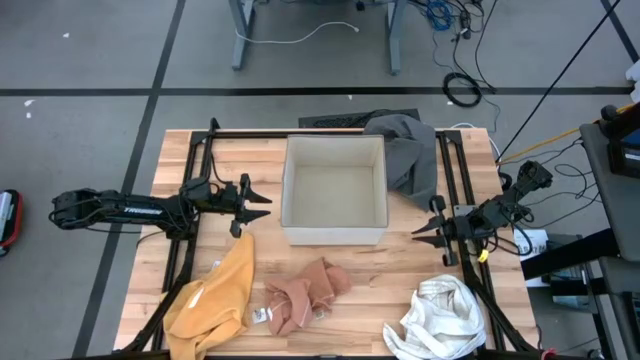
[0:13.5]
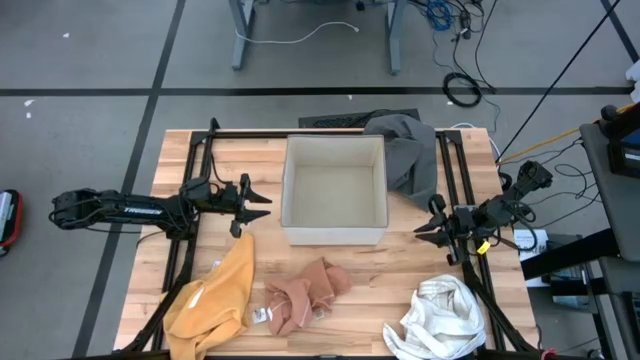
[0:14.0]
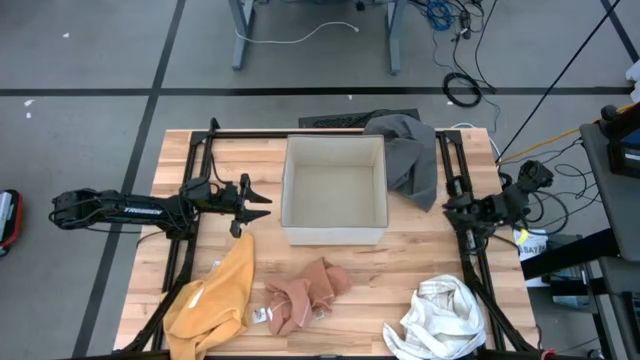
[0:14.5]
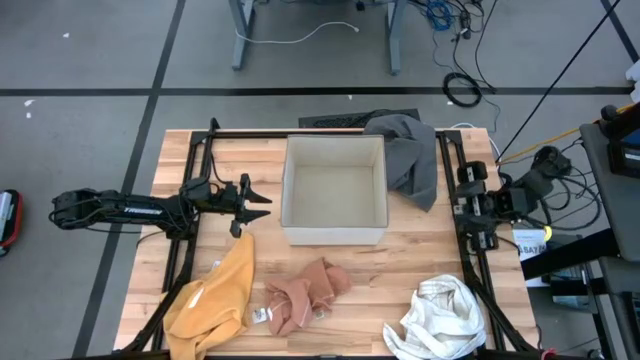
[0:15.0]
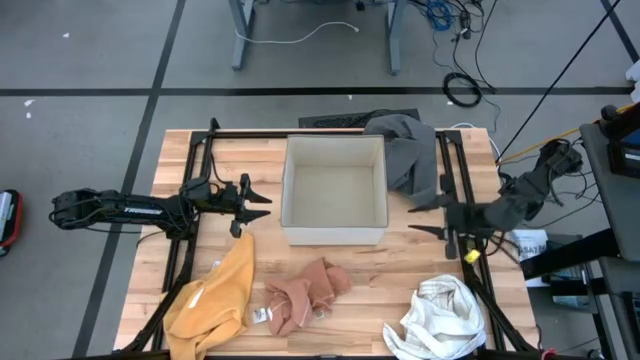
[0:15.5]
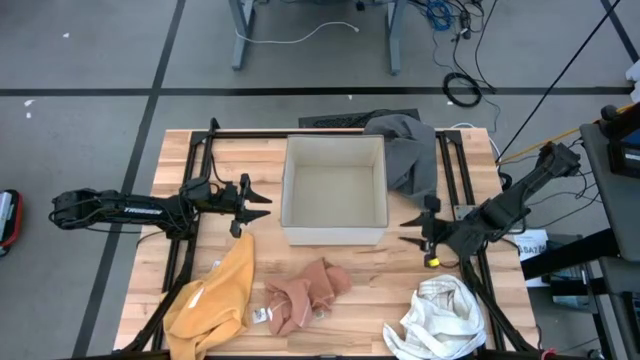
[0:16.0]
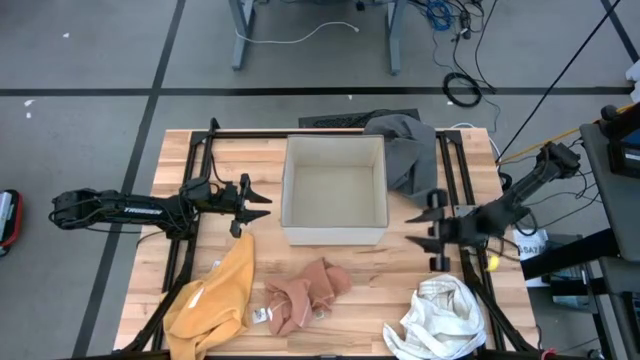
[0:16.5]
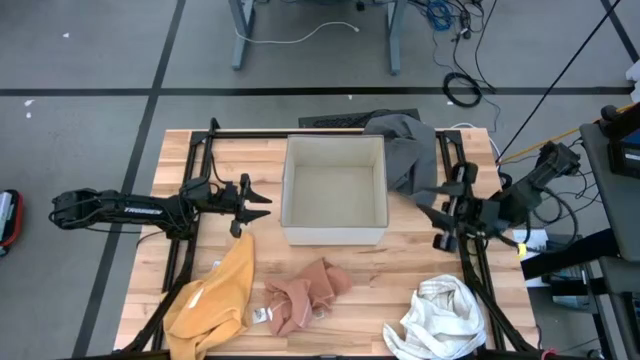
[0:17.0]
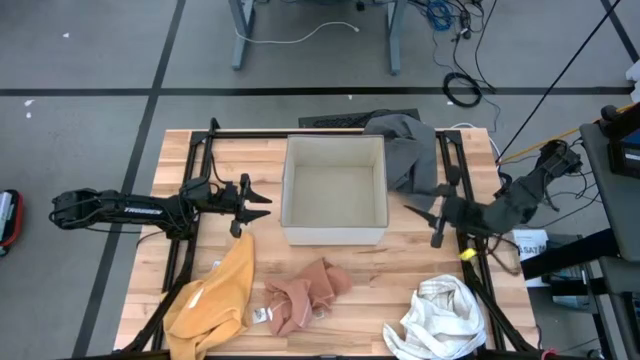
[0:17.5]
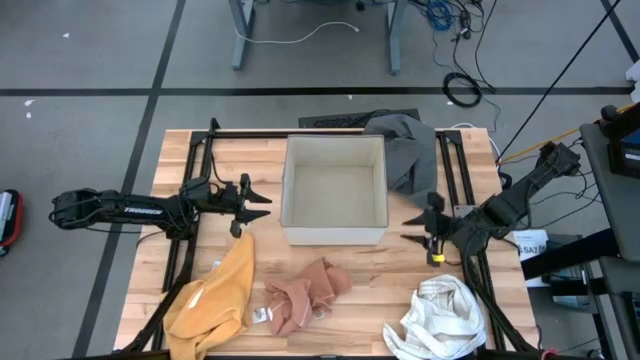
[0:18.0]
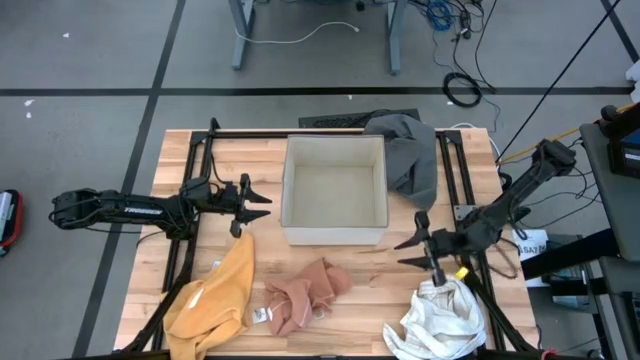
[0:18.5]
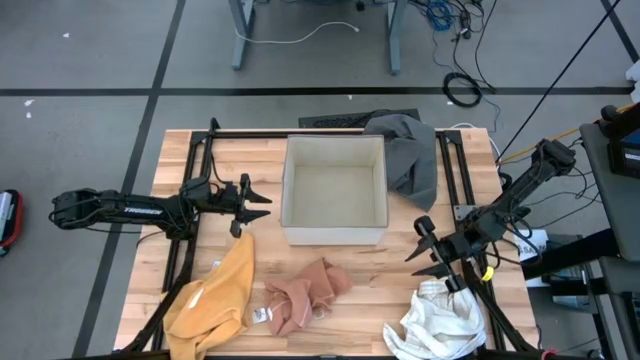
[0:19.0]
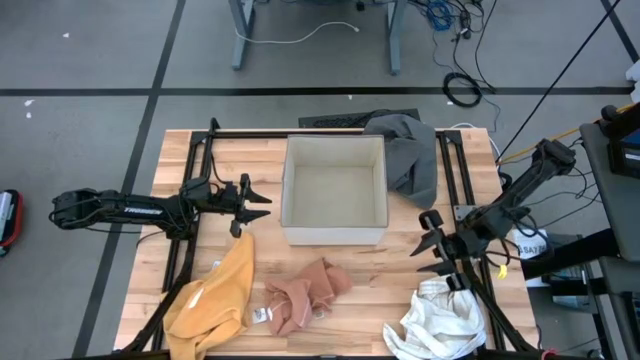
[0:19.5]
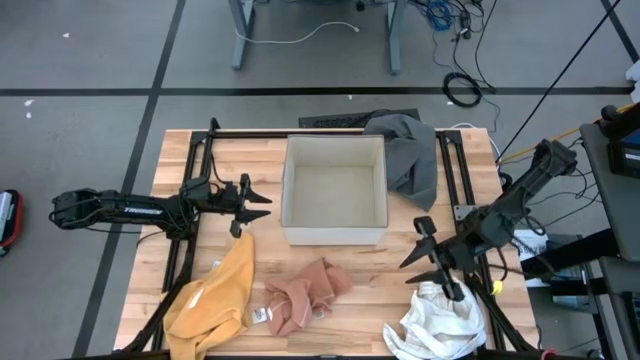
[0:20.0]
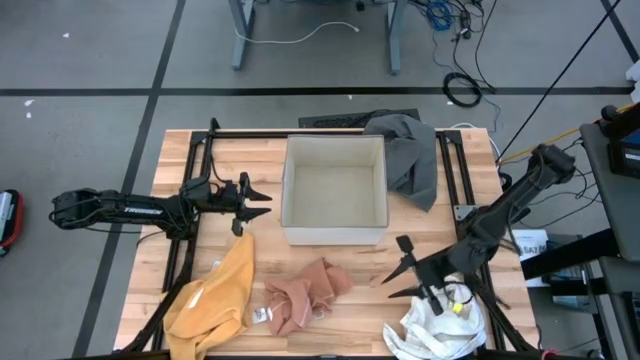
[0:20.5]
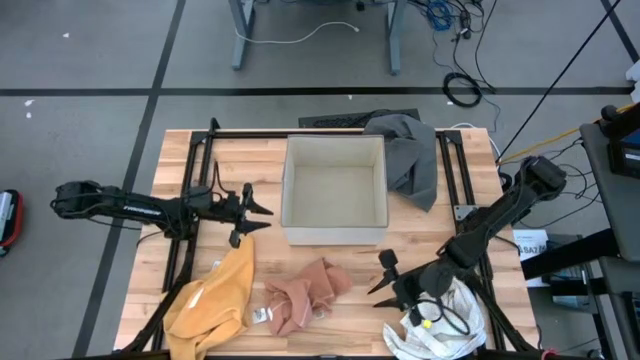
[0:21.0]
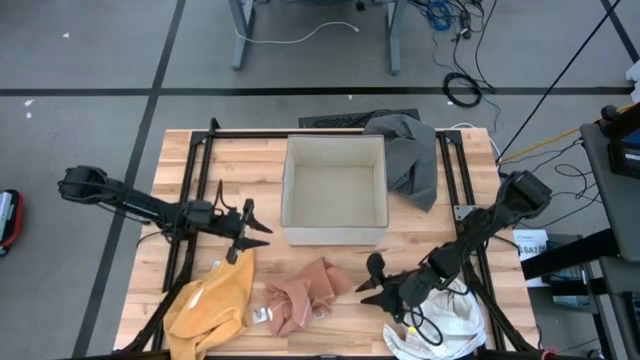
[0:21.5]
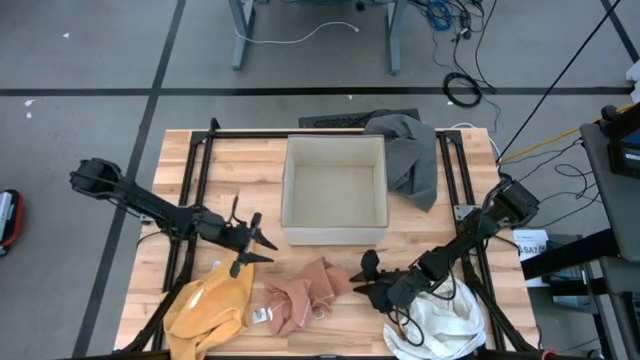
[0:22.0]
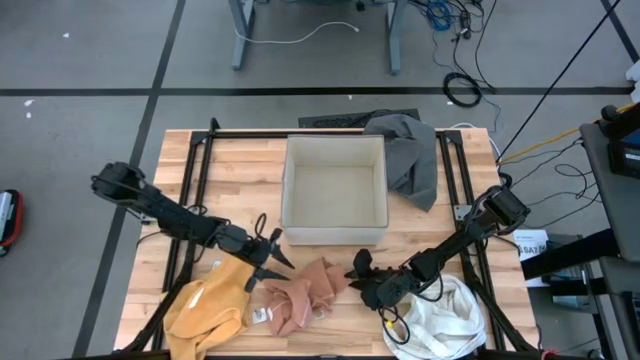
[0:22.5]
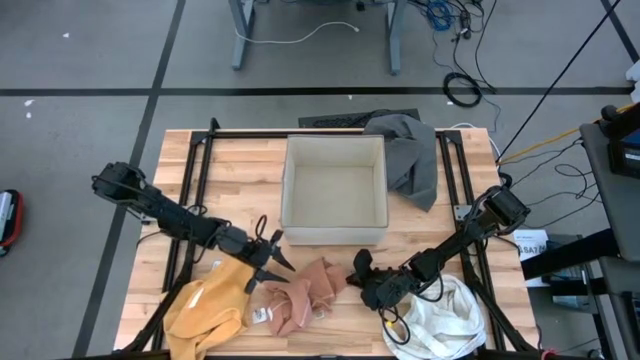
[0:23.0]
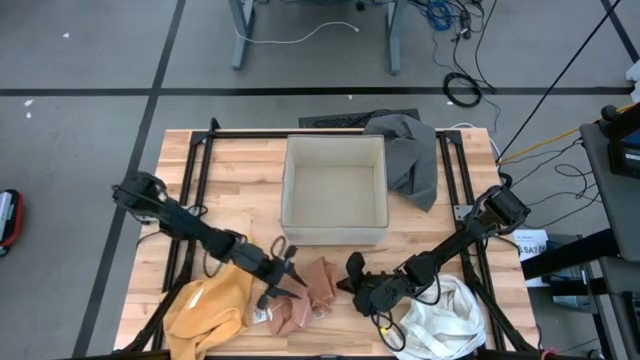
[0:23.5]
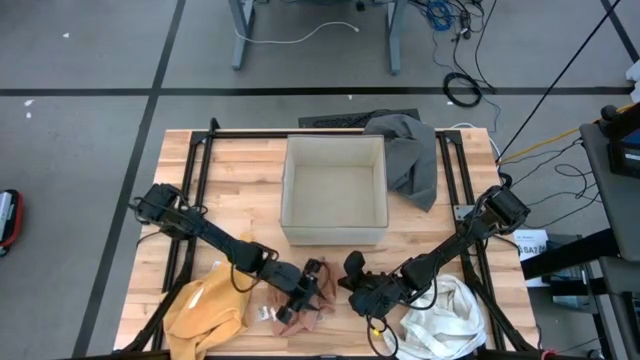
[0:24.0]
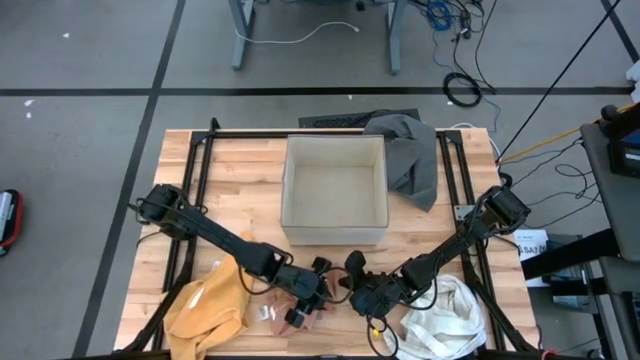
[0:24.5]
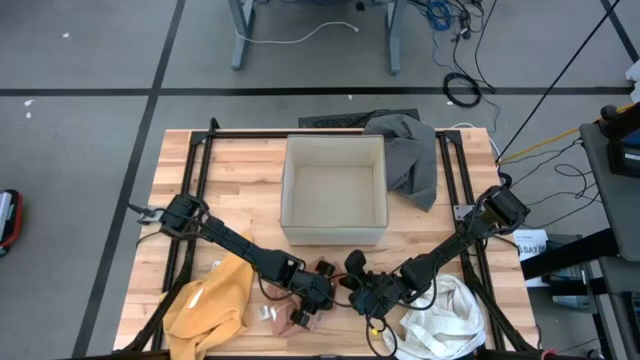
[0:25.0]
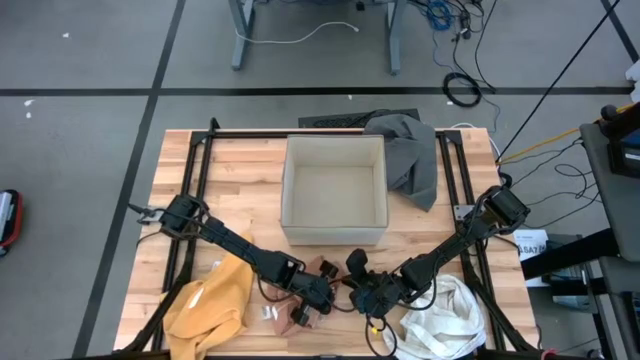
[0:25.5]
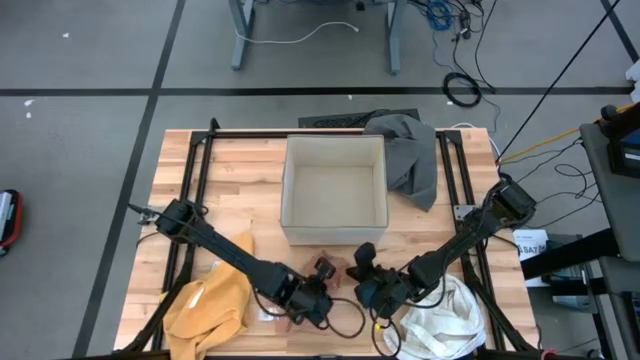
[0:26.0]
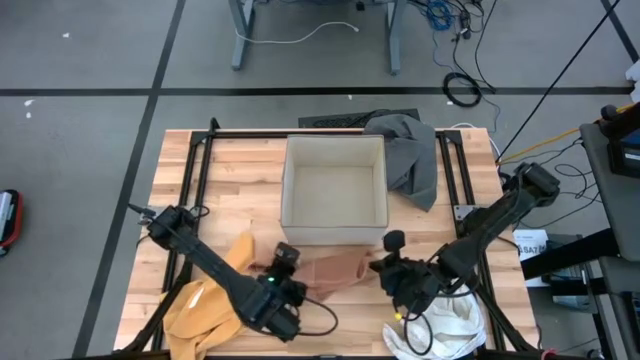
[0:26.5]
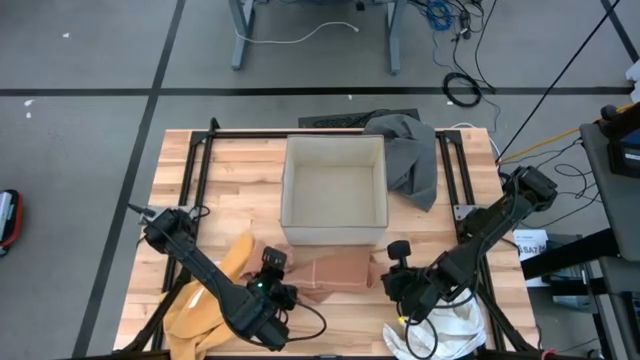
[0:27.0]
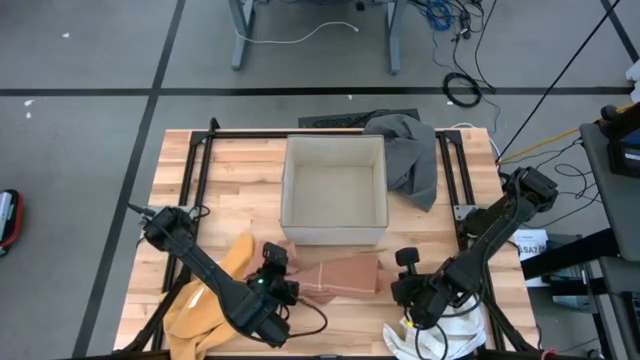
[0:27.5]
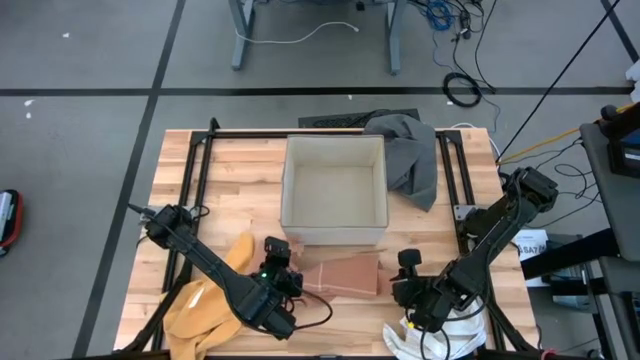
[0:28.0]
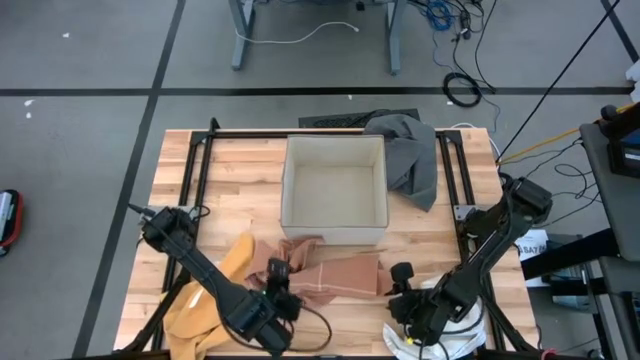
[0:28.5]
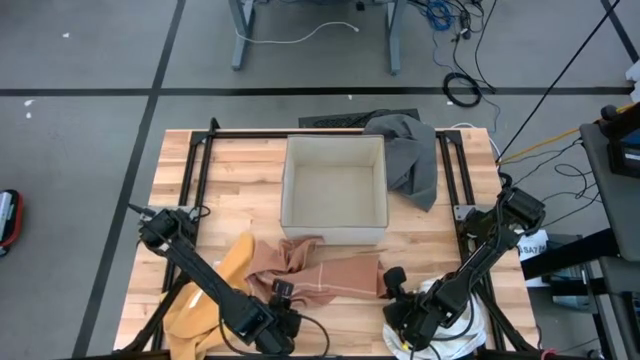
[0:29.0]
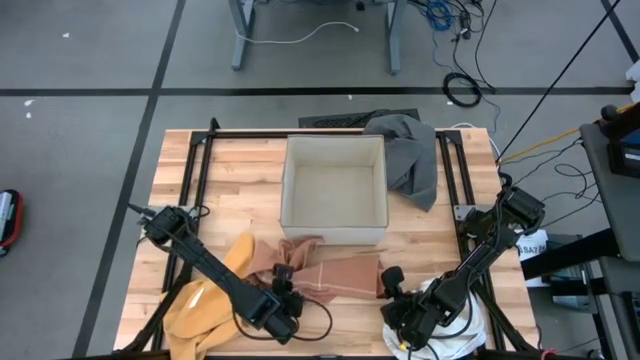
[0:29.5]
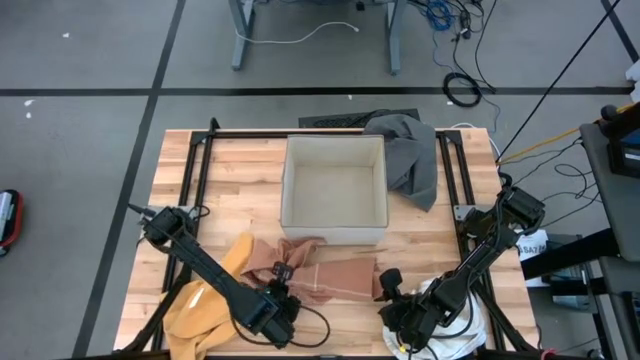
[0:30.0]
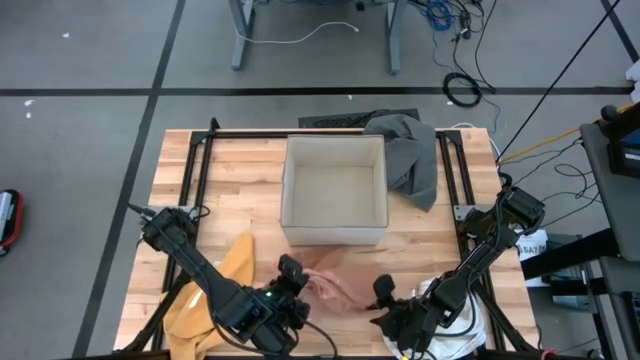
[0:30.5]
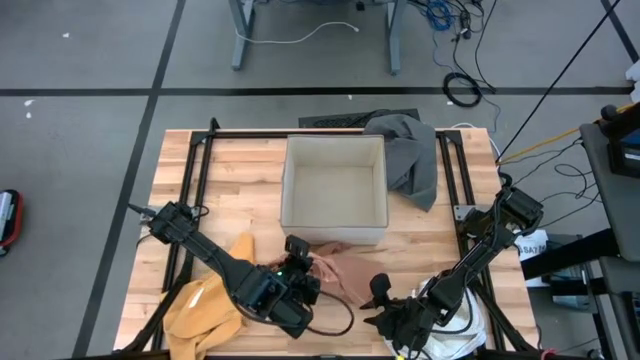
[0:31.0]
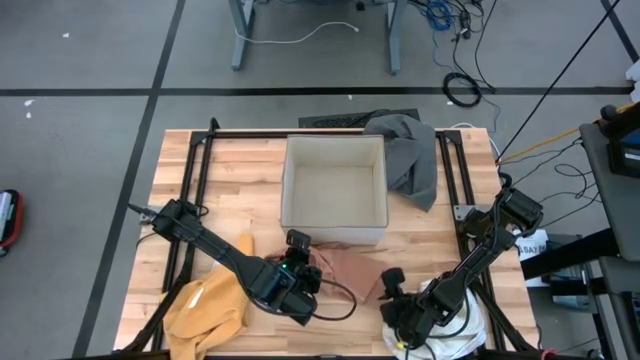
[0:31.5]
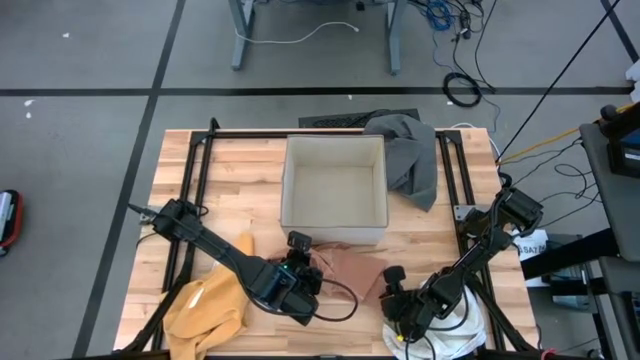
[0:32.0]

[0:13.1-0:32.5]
Task: Fold towel
Fold the brown towel
